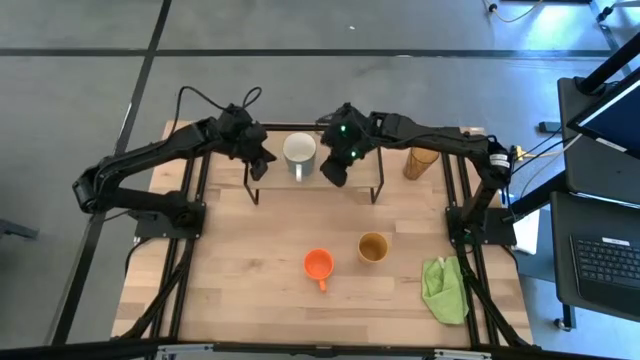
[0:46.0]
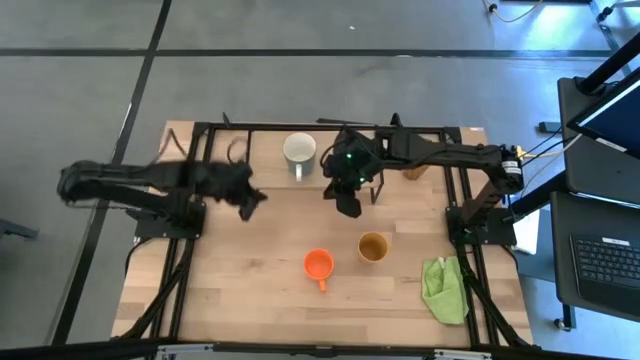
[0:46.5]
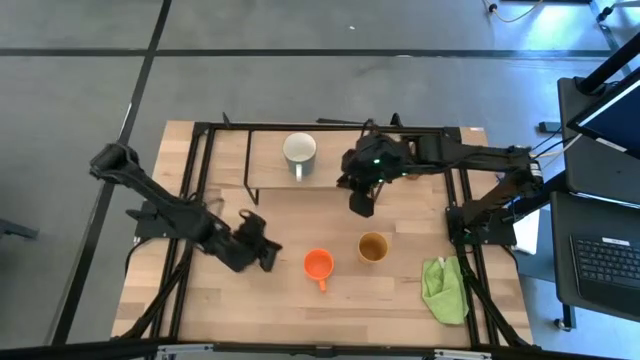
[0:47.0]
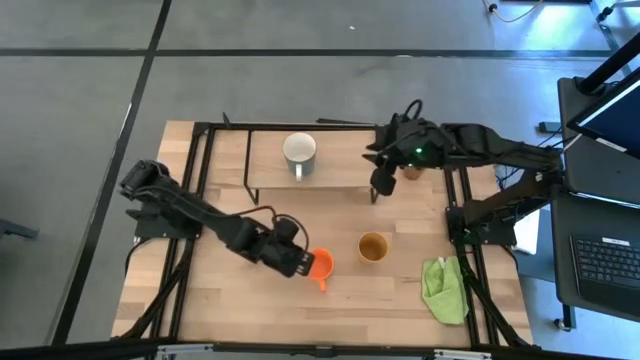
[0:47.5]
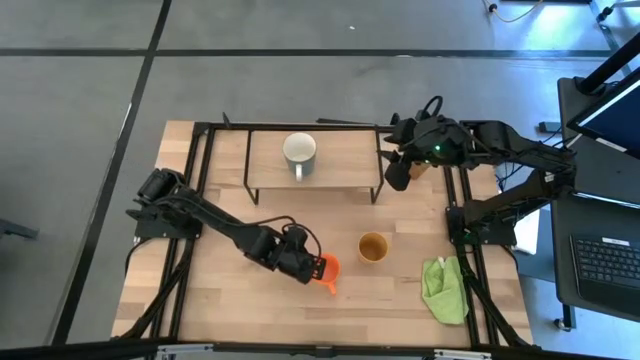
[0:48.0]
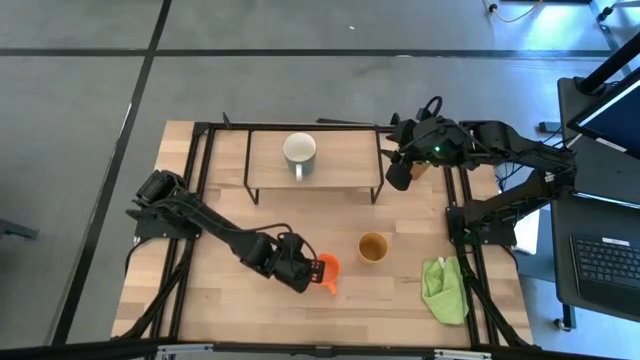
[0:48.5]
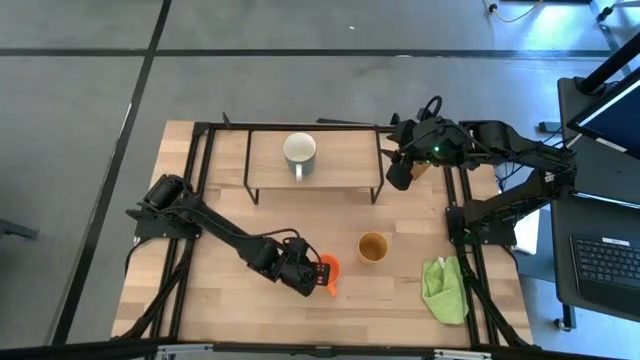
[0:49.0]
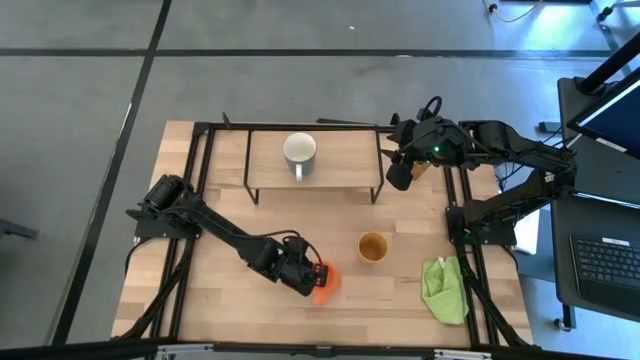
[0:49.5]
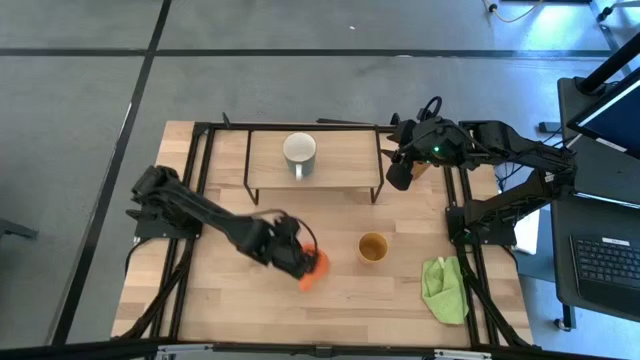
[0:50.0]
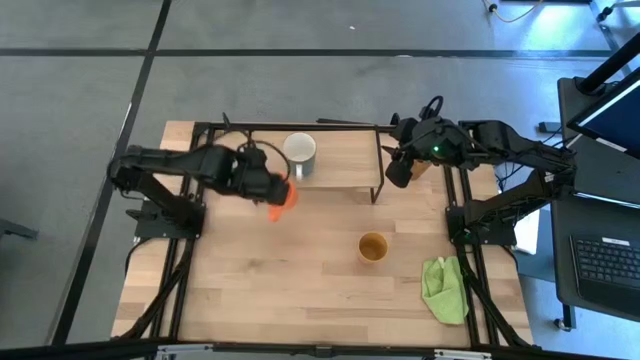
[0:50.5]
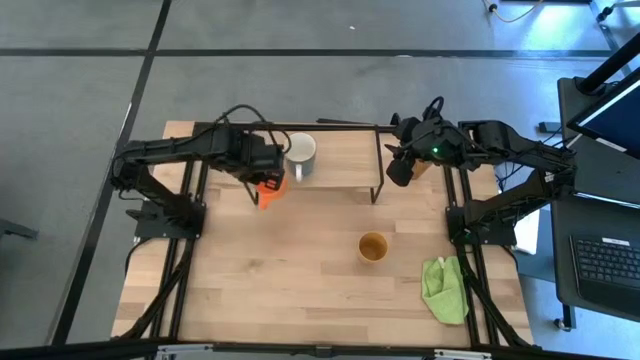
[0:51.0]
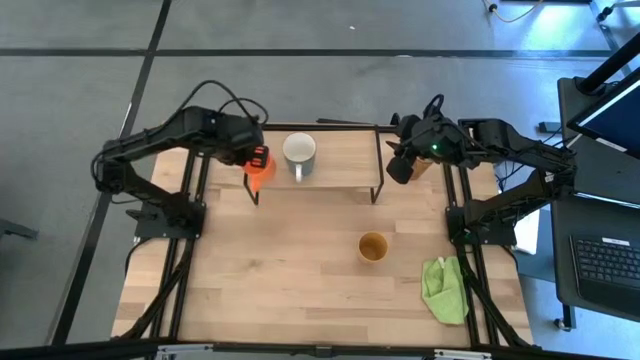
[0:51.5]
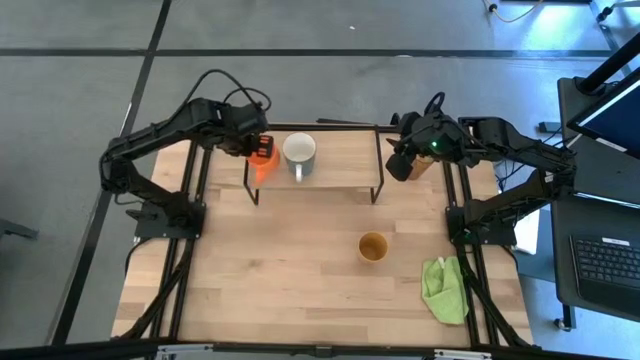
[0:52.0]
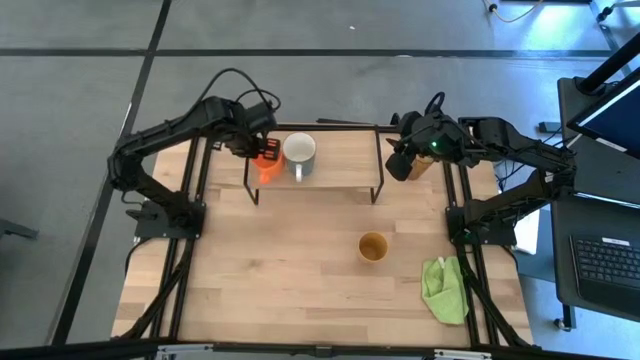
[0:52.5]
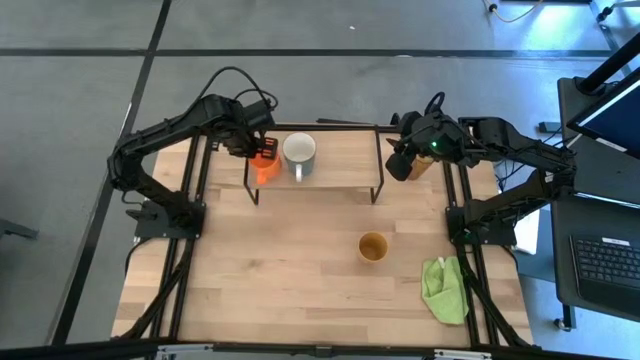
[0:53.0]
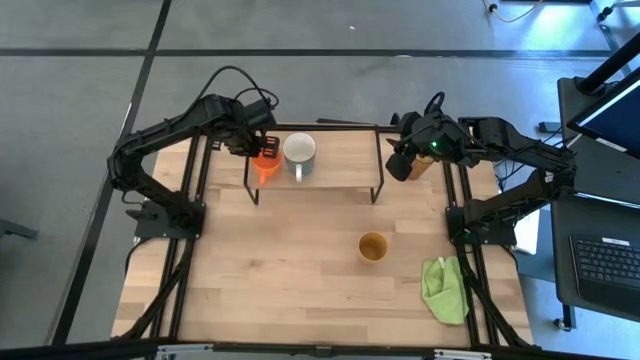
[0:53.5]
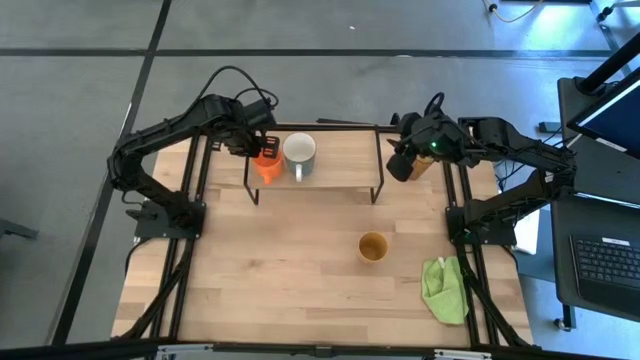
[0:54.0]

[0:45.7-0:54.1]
Task: Stack small to large cups/mugs on shelf
Put the orange mug on the shelf

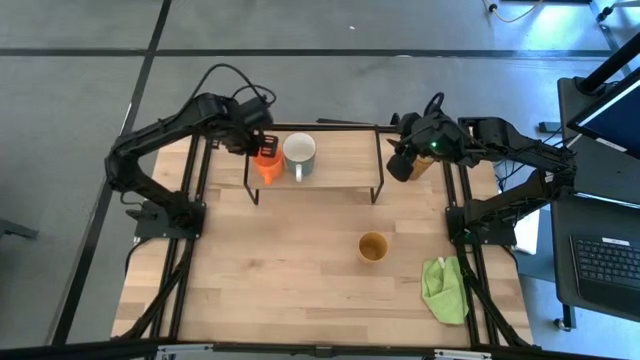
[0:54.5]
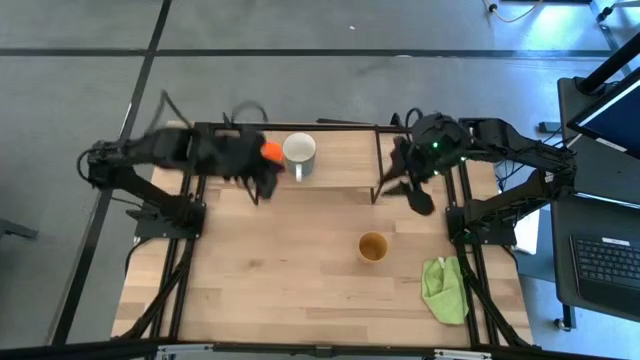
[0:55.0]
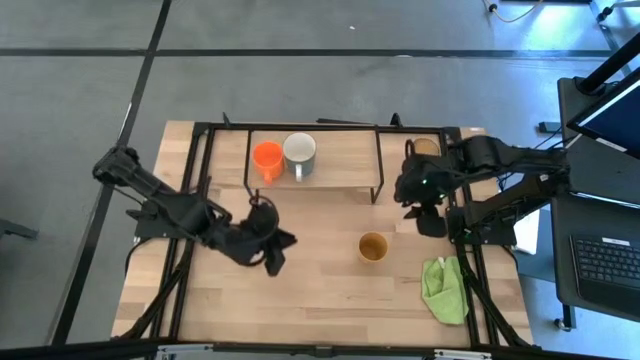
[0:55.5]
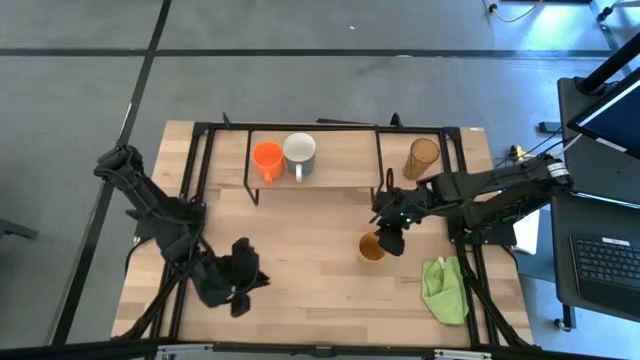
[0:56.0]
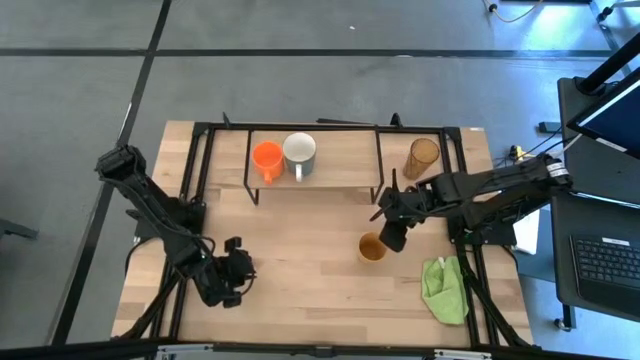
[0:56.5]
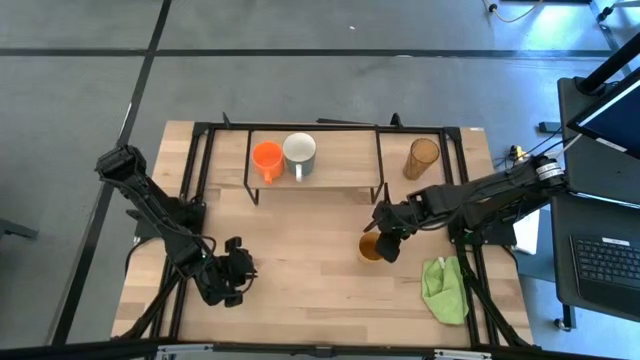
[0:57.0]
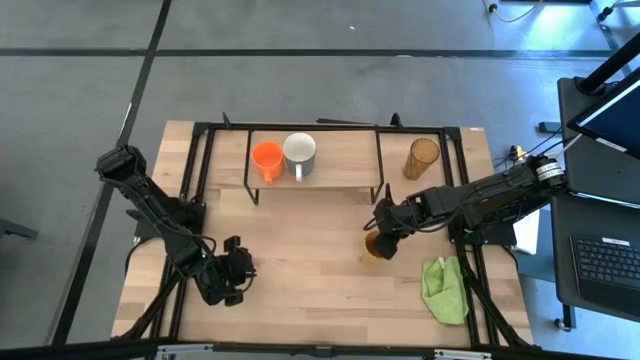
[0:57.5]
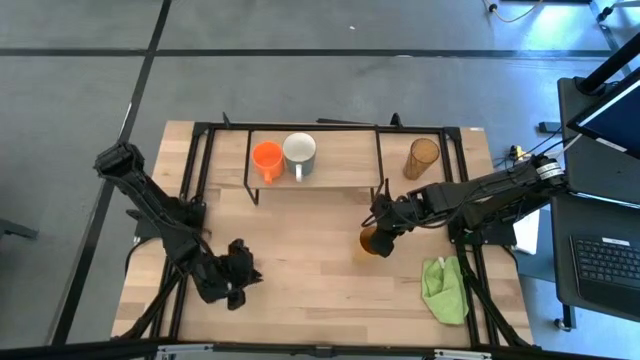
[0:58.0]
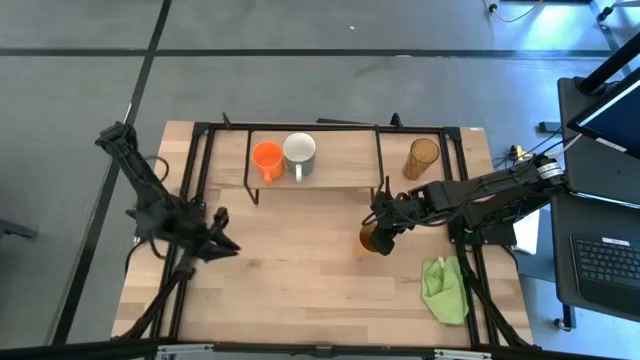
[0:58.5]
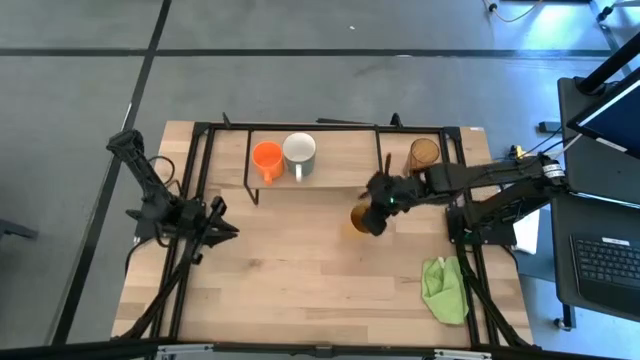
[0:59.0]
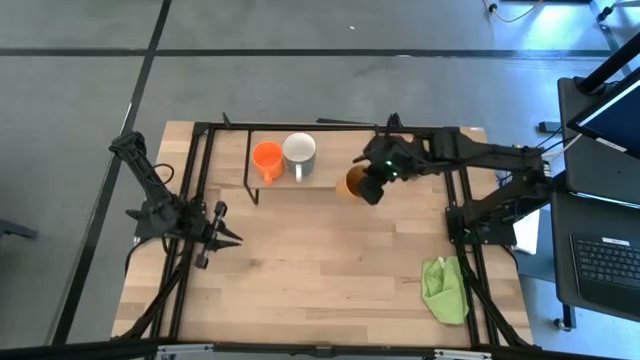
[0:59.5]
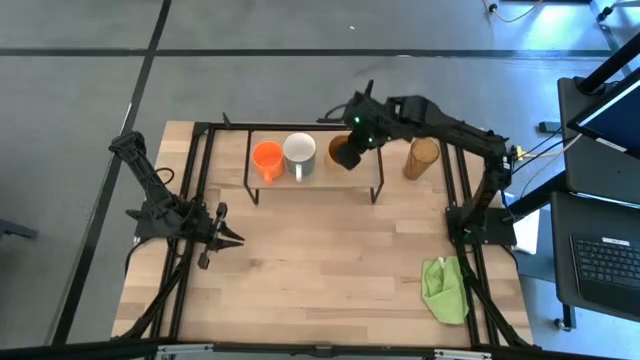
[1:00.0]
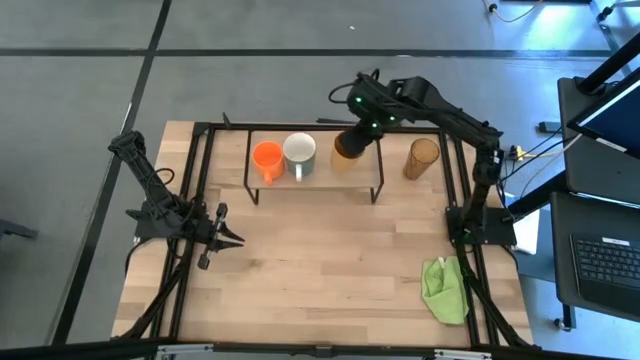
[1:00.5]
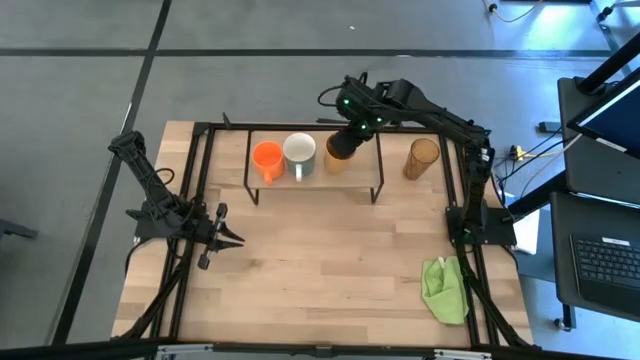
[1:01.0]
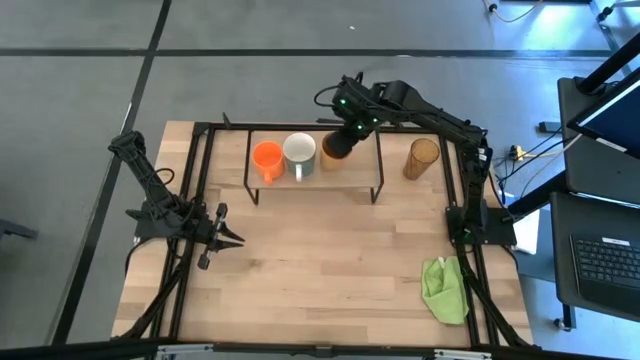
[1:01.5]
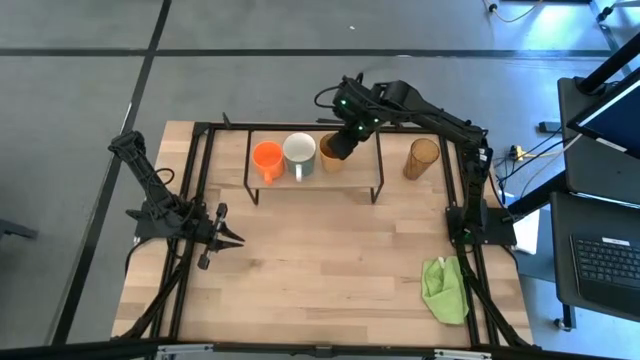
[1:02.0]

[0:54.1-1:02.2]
Put the yellow cup on the shelf

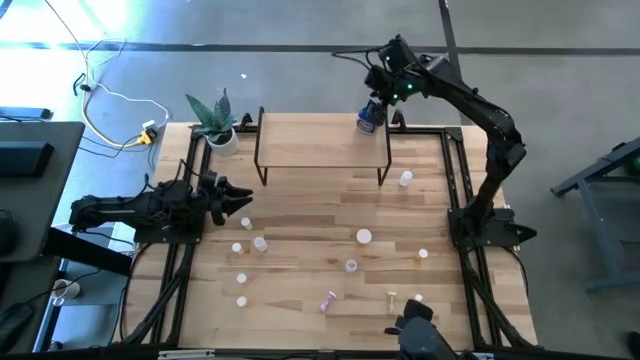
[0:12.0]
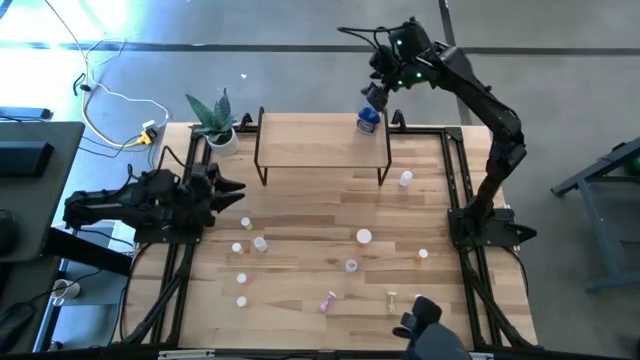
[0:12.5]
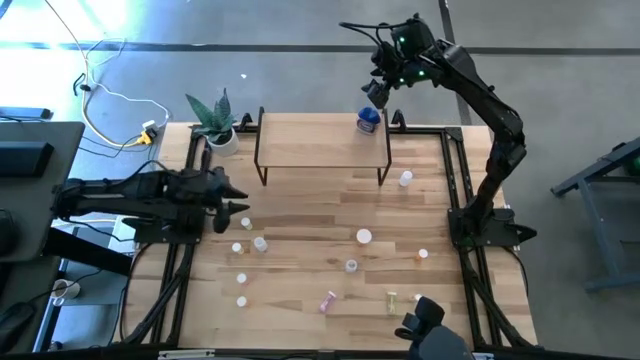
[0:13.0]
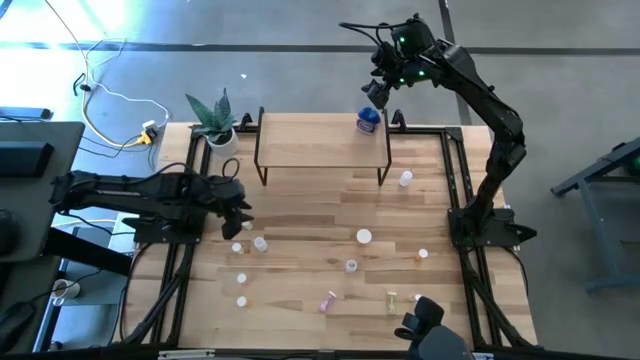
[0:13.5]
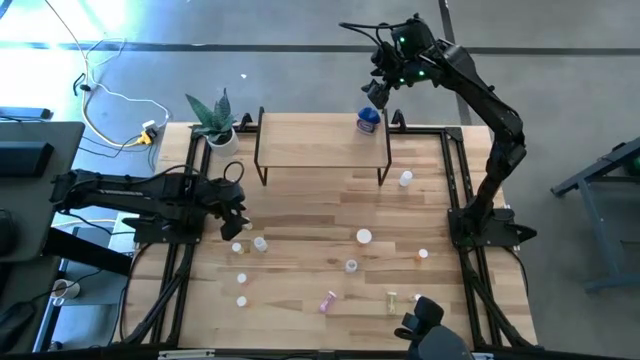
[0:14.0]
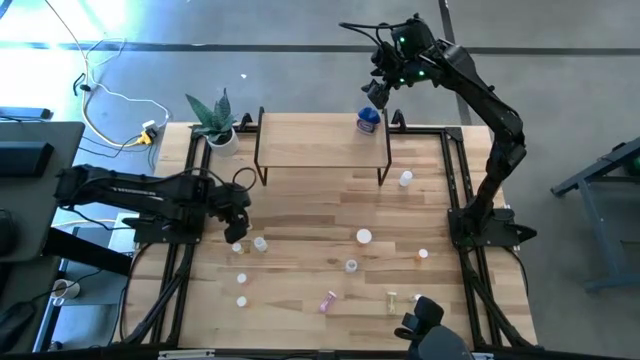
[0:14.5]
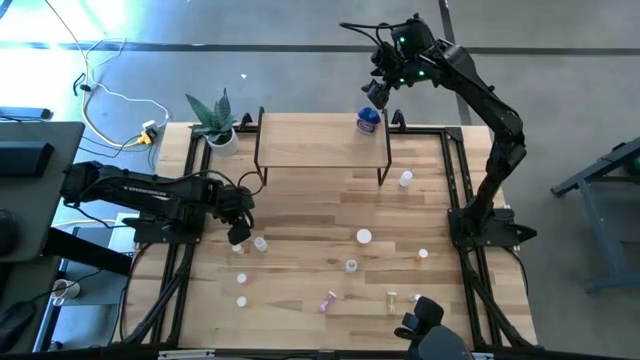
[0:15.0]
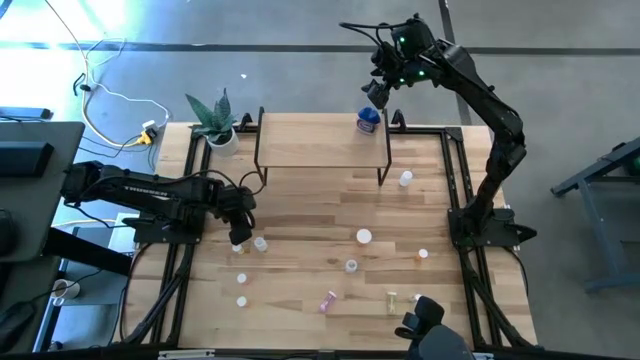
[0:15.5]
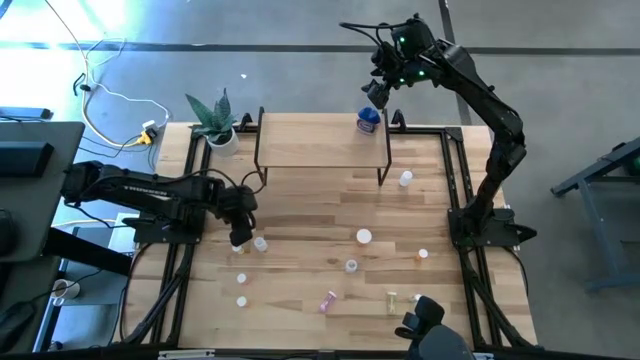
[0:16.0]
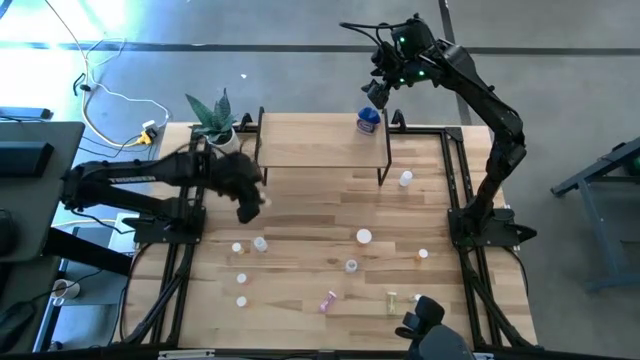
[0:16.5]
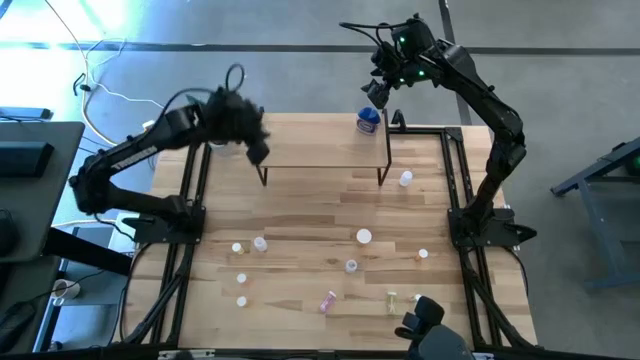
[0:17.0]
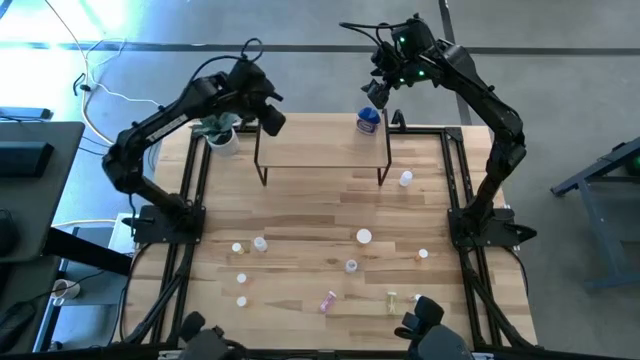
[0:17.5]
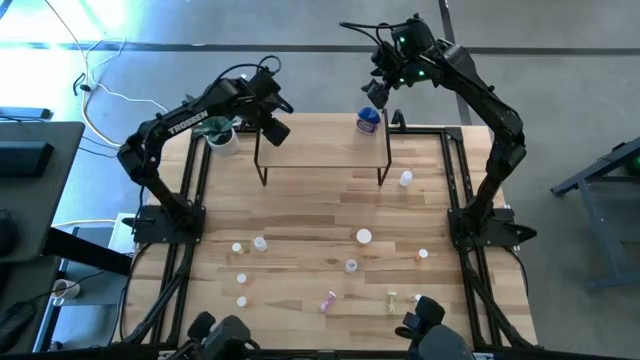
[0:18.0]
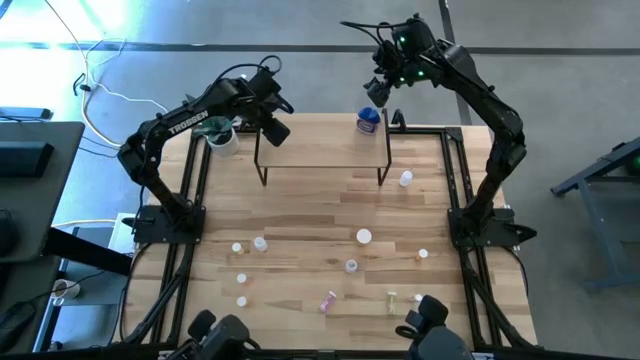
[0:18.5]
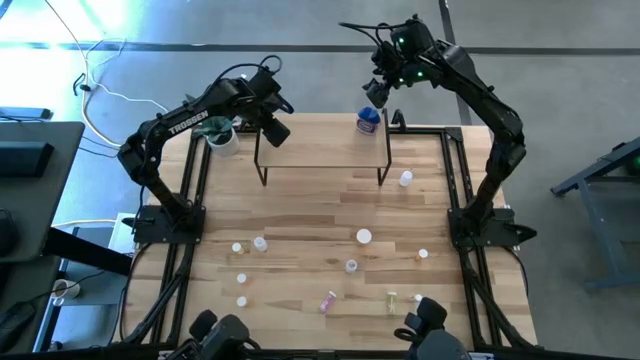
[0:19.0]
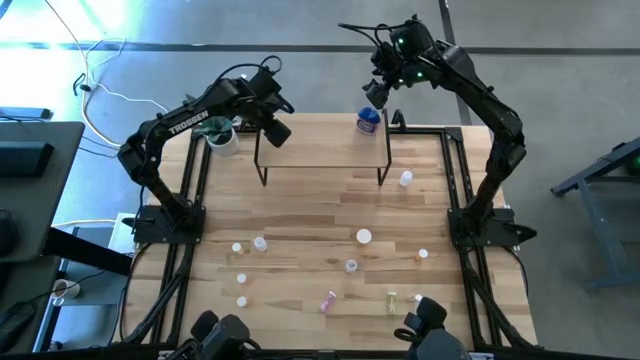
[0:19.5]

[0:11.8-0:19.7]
Task: Pick and place medicine bottles onto shelf by color
Put the small yellow pill bottle on the shelf
